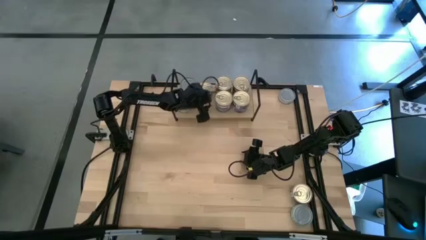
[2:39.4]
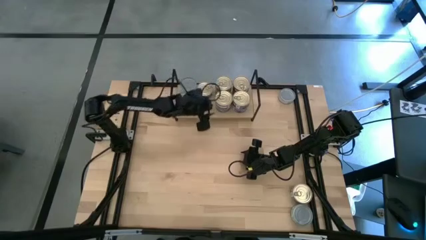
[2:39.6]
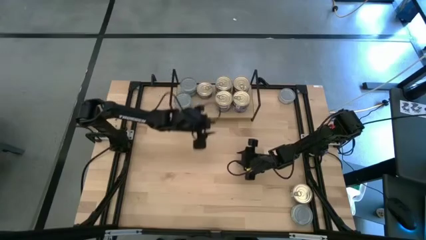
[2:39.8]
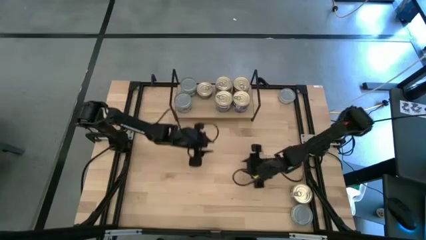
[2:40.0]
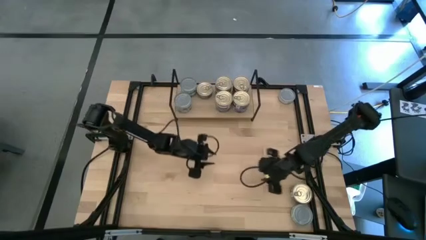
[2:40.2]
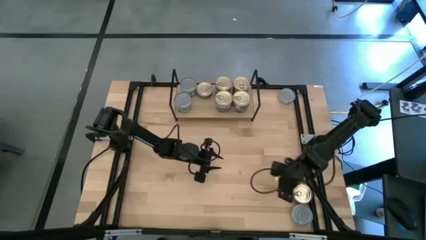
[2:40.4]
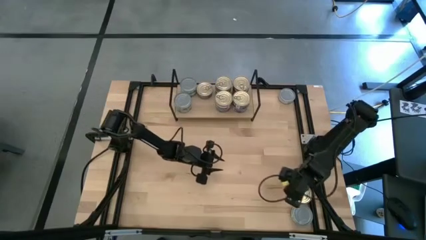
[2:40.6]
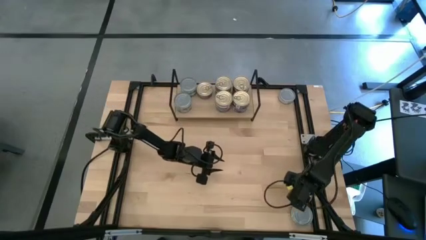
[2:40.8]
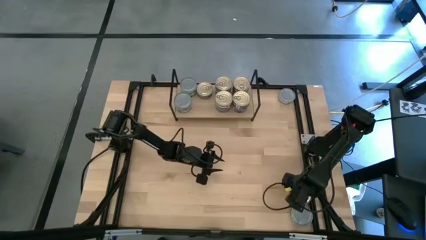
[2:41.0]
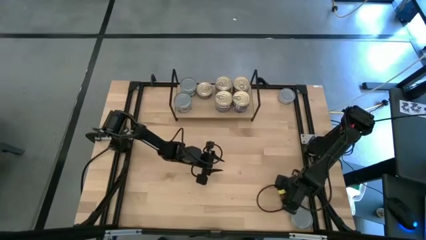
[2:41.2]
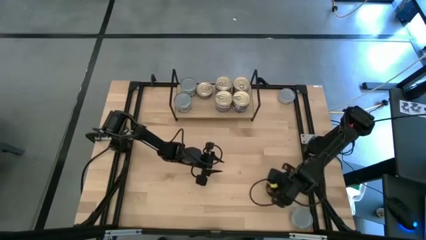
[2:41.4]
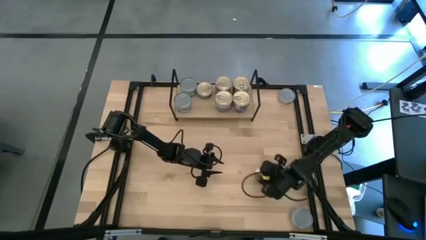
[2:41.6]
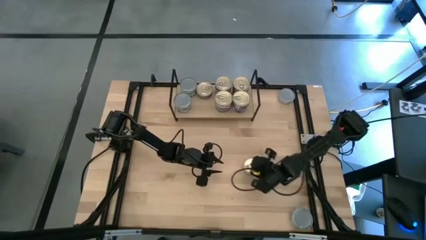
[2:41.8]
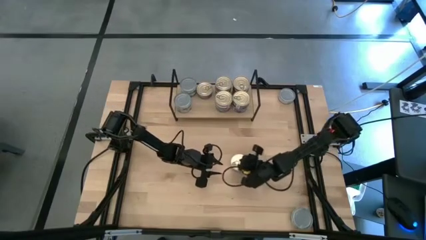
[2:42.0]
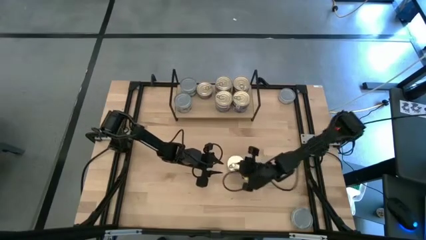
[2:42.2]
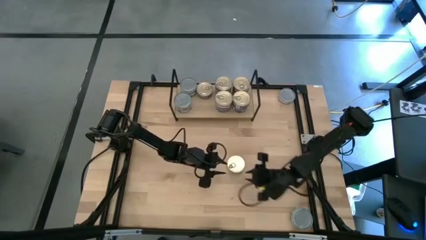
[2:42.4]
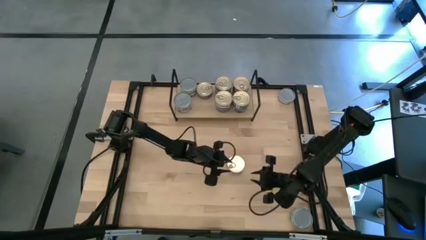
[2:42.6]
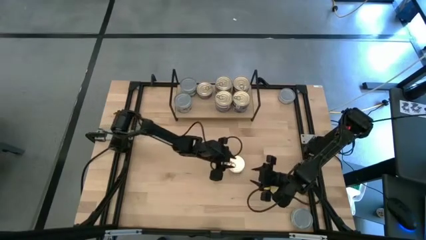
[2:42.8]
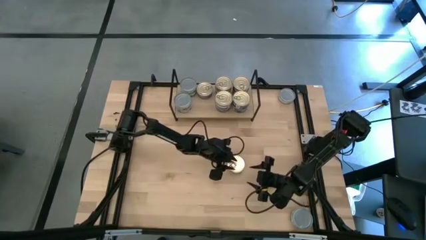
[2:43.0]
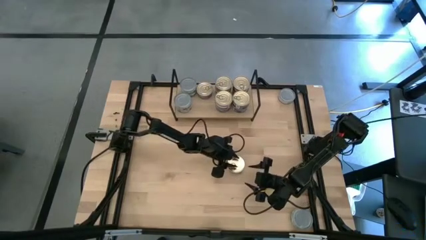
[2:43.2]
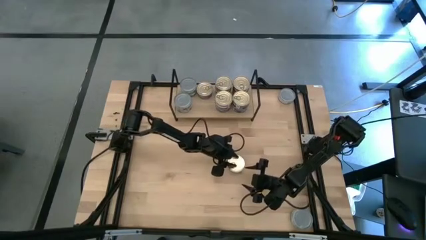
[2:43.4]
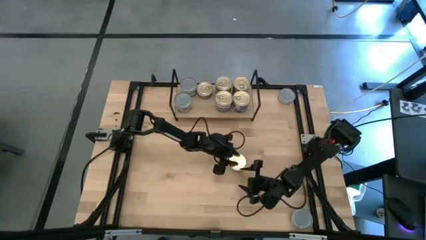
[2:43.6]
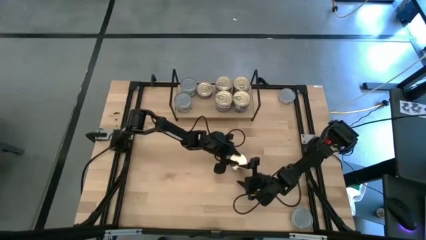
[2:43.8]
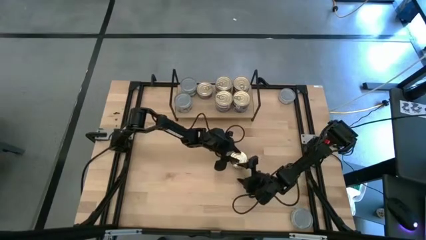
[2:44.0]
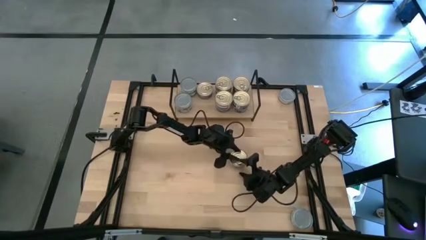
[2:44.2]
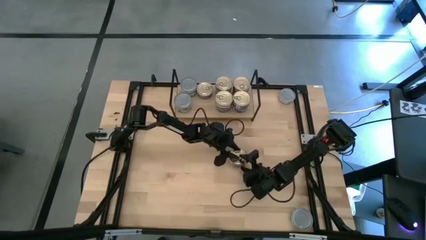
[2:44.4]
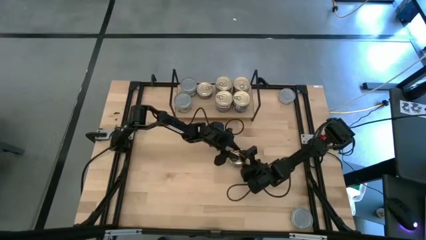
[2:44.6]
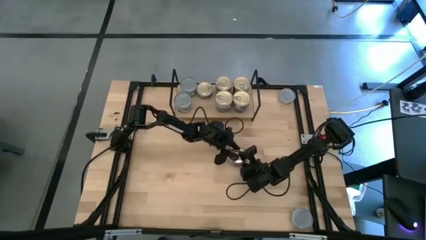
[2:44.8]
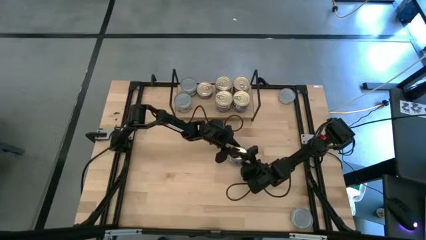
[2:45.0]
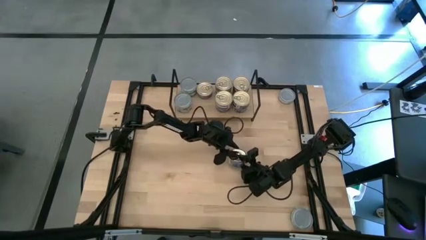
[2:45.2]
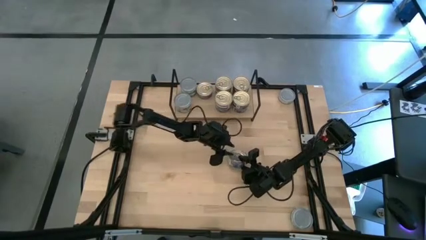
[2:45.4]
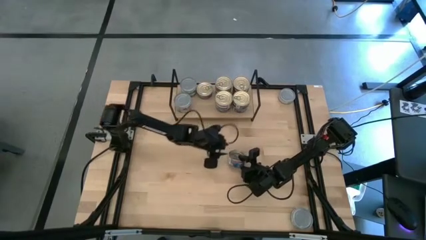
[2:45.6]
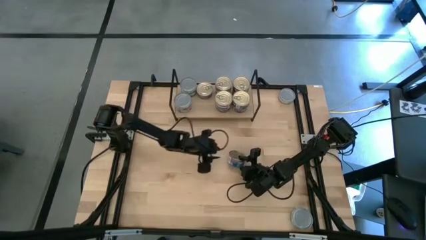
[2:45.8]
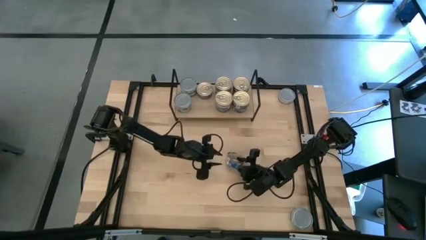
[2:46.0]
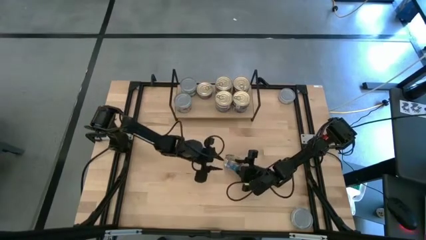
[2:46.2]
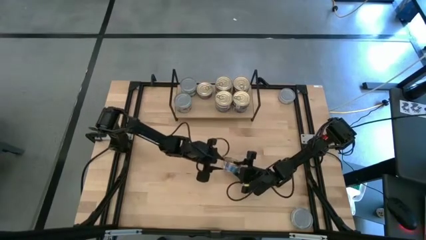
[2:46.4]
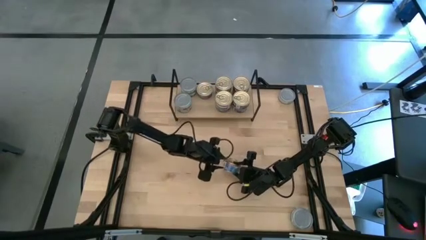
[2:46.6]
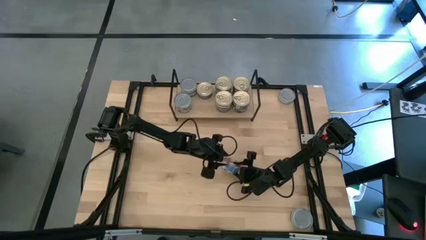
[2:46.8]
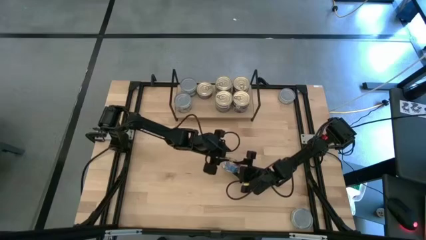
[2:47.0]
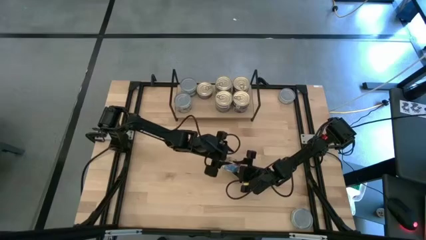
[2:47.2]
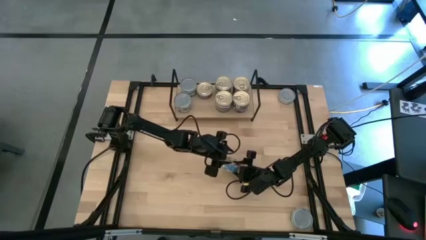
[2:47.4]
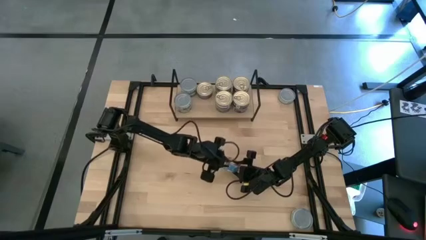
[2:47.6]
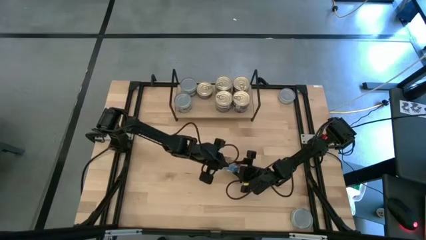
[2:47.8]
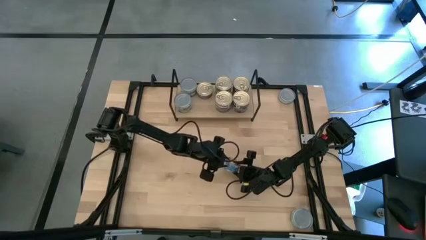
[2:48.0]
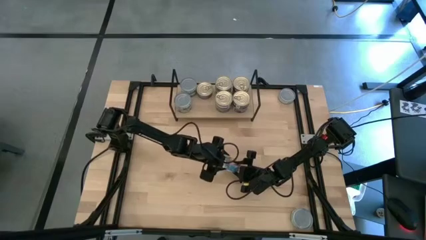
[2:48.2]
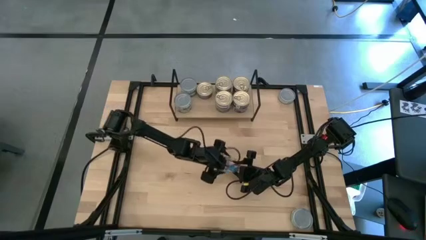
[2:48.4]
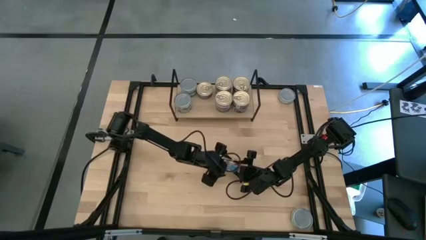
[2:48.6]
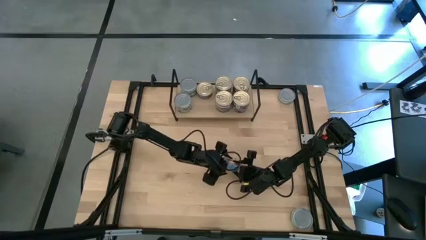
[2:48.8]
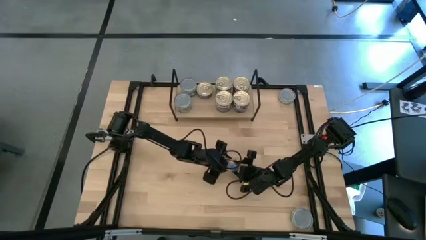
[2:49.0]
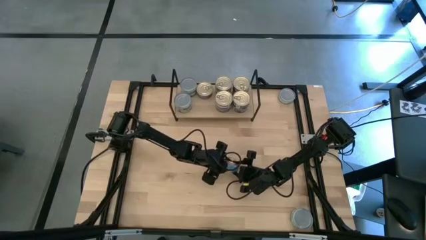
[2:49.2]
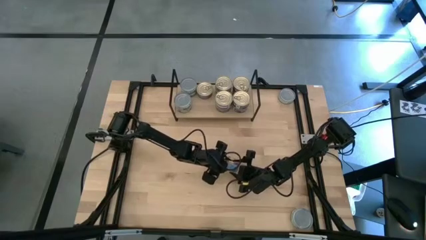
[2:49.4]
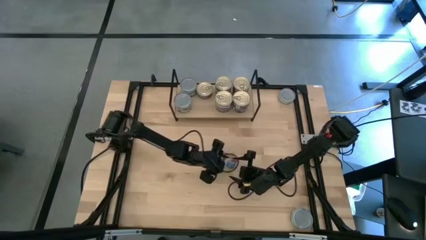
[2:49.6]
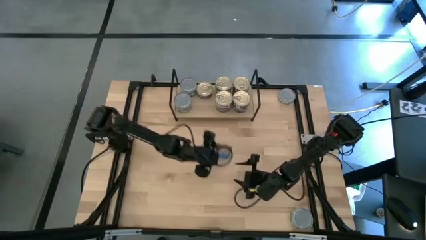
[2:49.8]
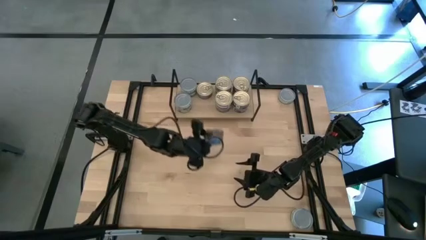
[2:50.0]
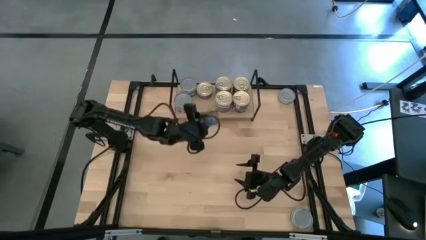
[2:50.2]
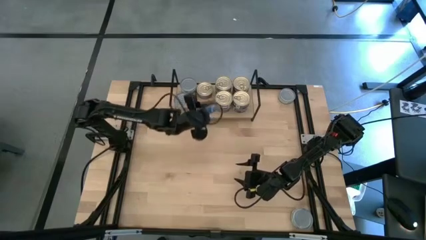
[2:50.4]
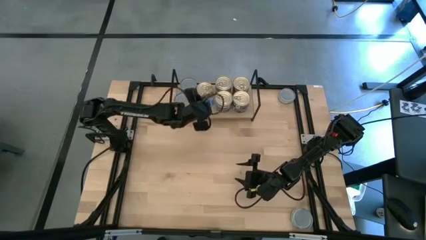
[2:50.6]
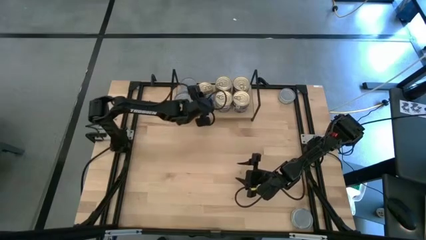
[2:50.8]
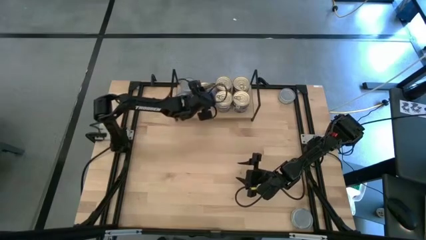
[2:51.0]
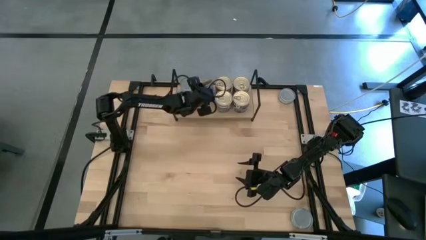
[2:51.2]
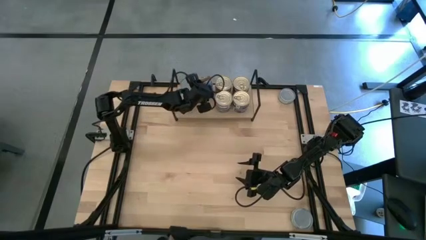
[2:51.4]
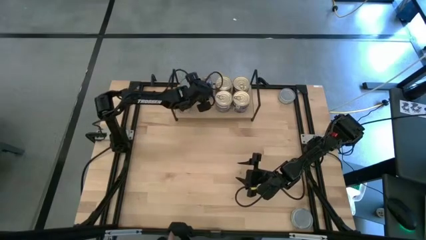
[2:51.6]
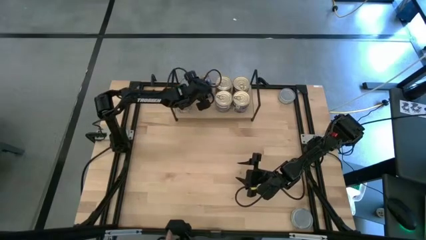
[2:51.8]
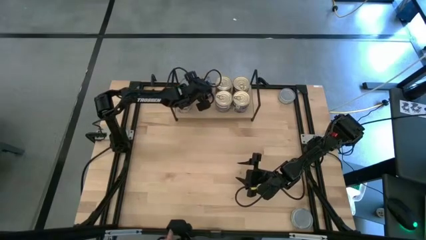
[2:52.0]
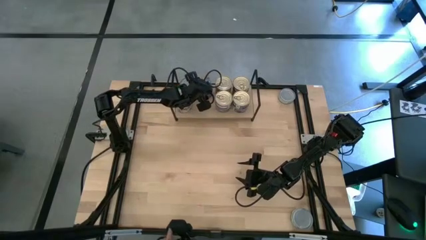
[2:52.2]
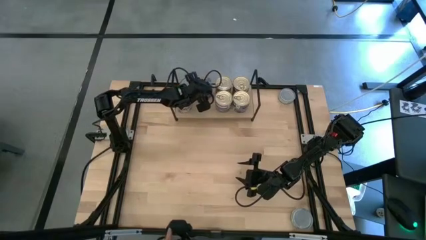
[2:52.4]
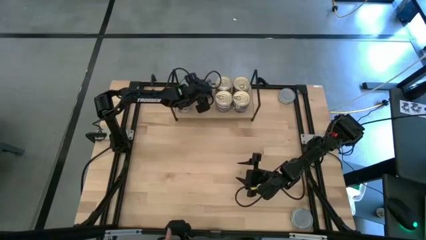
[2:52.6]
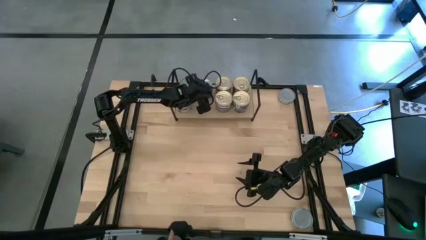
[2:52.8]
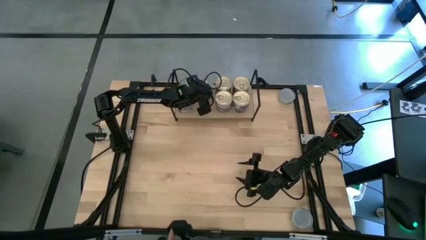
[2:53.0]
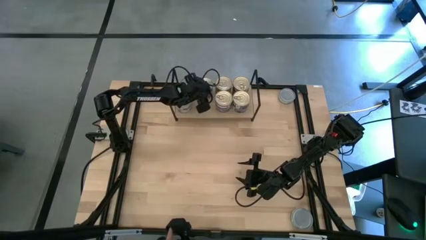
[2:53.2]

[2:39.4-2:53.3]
Task: Stack canned seafood by type on shelf
Stack the blue and pink tuna can on top of the blue and pink tuna can on the shelf

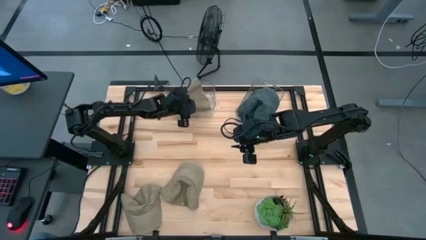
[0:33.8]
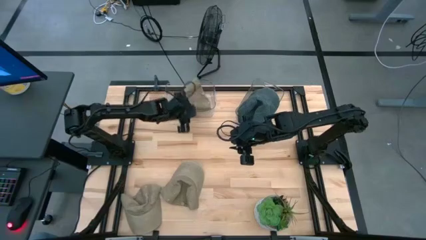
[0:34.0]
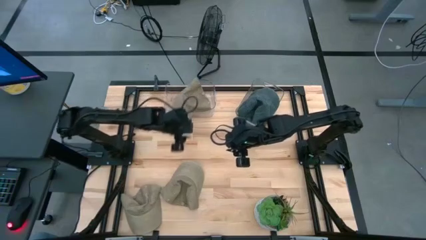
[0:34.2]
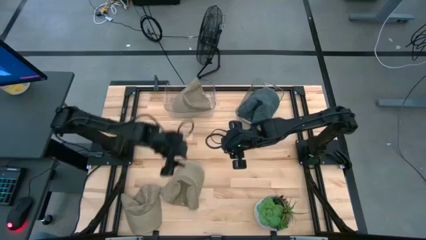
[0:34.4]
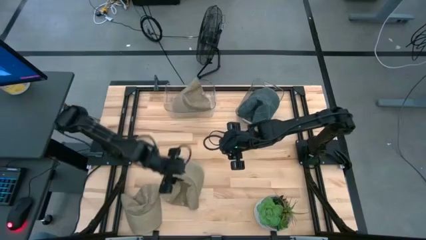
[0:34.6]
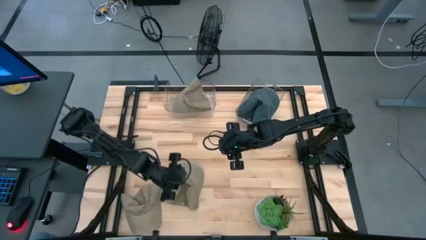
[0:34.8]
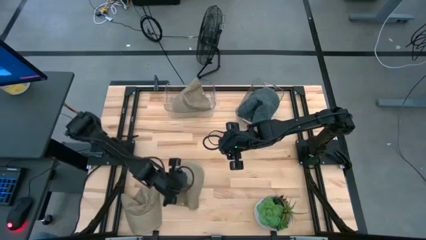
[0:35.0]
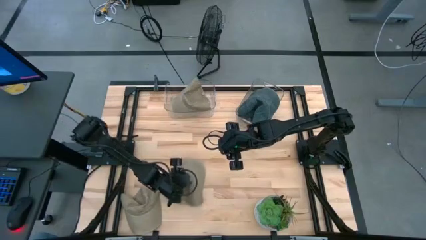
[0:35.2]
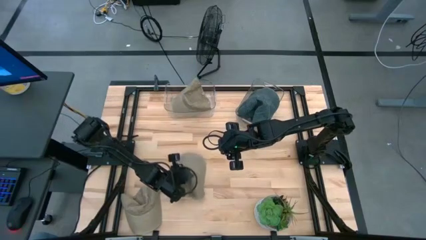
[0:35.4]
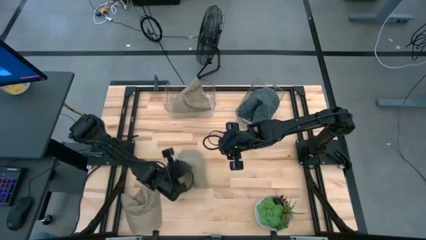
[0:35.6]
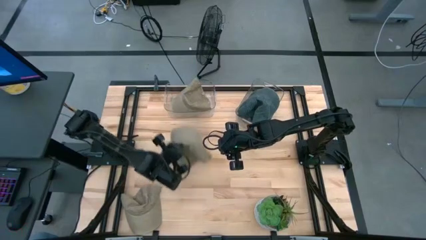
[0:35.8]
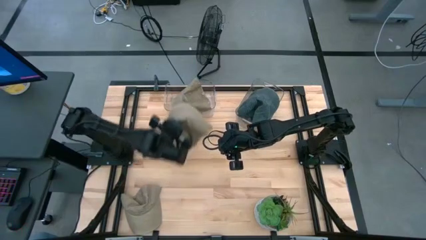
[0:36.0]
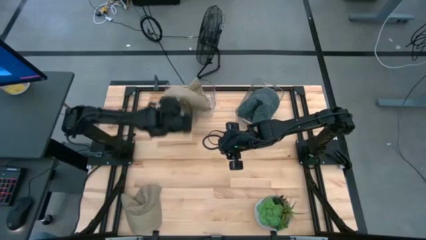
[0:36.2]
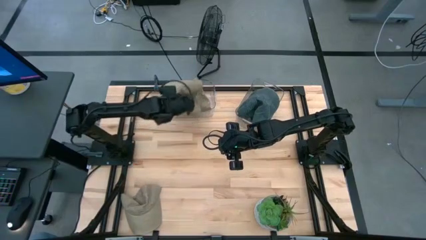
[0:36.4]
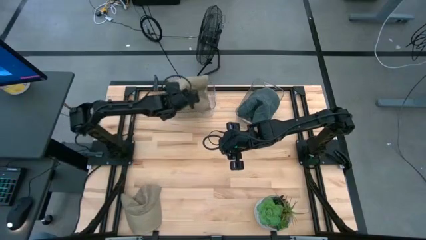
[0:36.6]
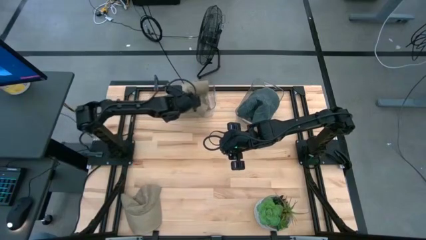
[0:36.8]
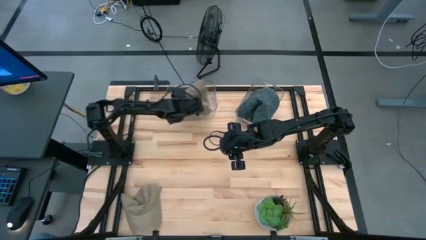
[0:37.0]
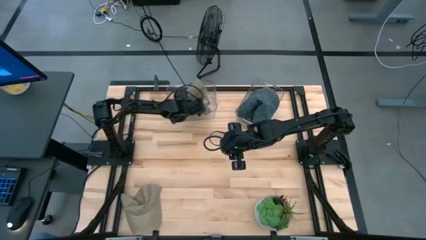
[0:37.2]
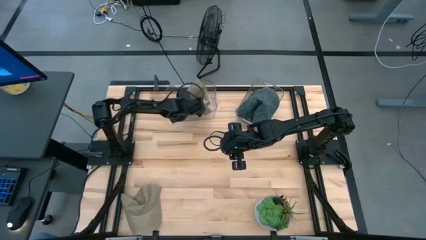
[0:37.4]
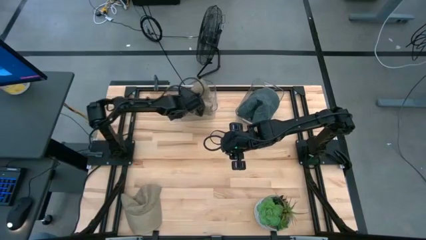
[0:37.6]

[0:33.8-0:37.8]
Task: Pick & Place hat
Put the right brown cap into the left transparent bin
